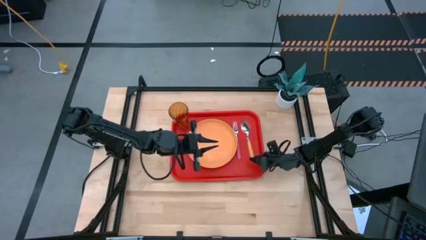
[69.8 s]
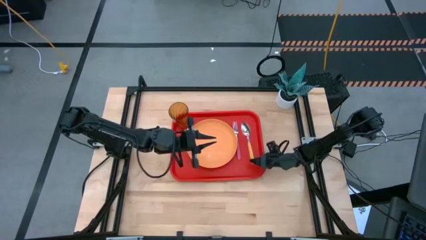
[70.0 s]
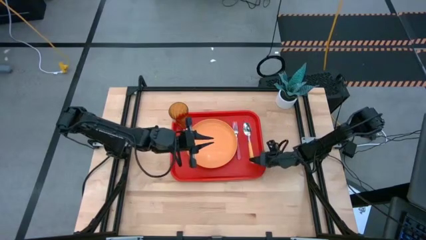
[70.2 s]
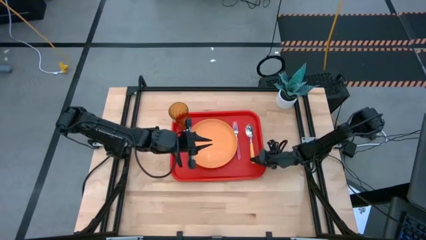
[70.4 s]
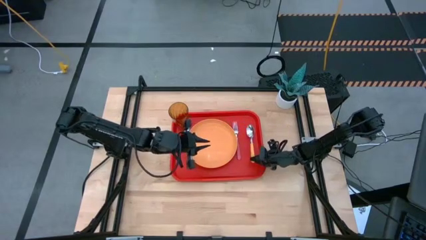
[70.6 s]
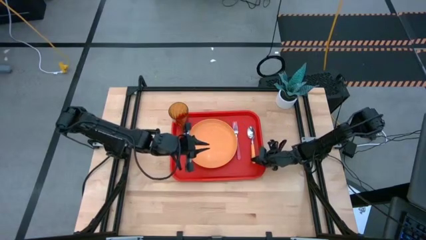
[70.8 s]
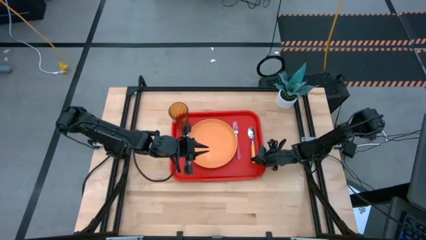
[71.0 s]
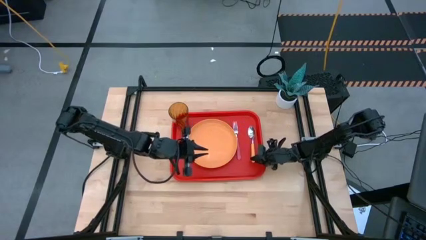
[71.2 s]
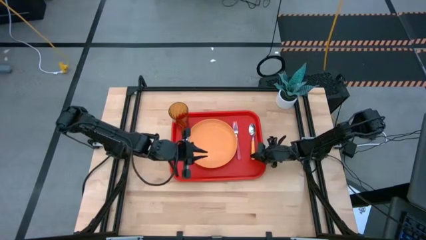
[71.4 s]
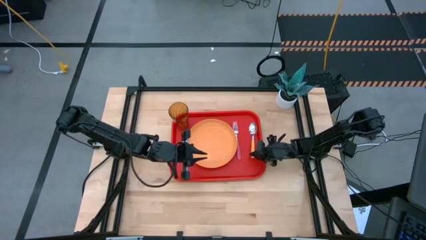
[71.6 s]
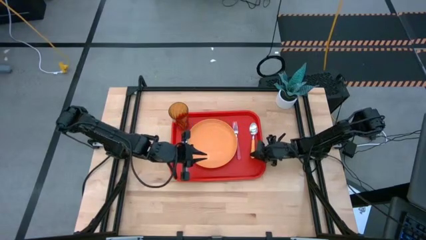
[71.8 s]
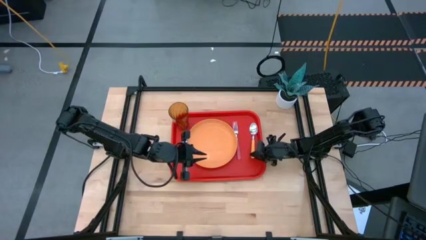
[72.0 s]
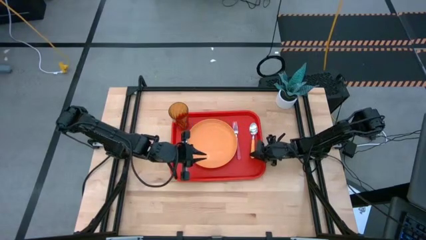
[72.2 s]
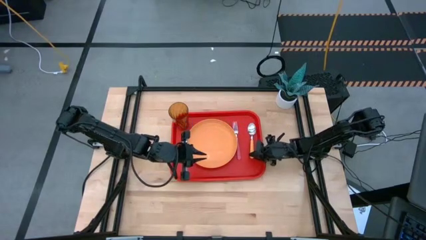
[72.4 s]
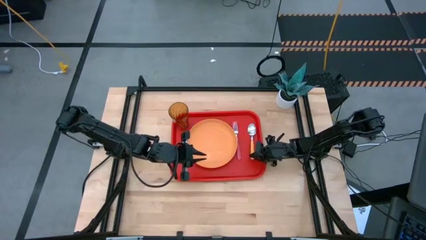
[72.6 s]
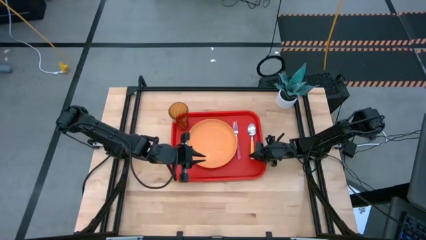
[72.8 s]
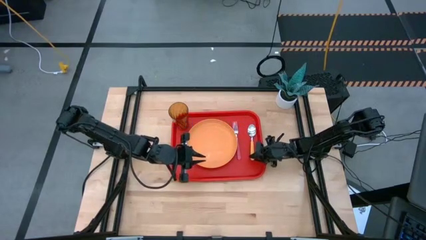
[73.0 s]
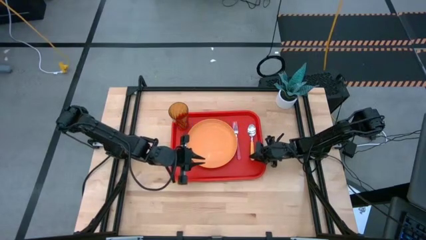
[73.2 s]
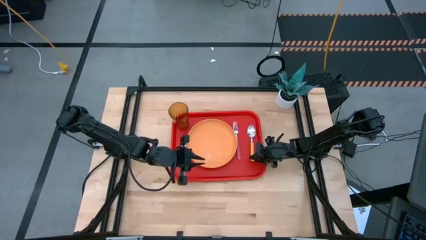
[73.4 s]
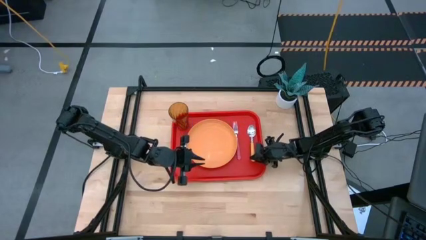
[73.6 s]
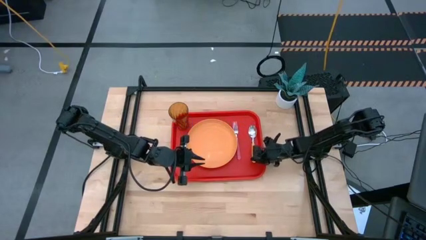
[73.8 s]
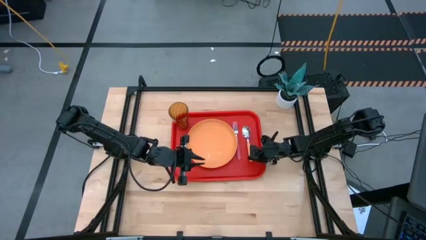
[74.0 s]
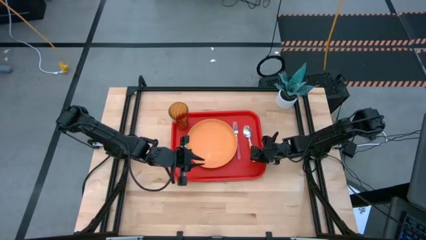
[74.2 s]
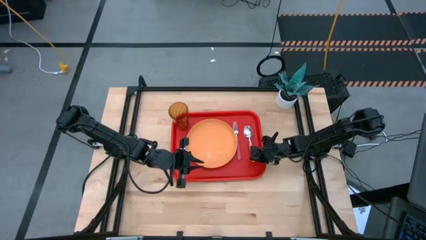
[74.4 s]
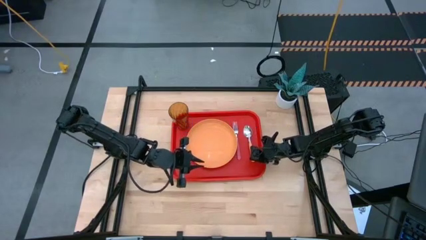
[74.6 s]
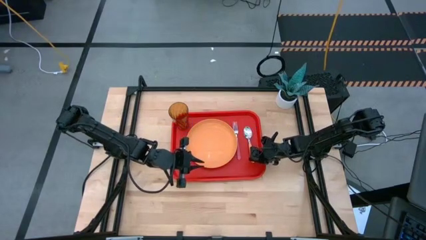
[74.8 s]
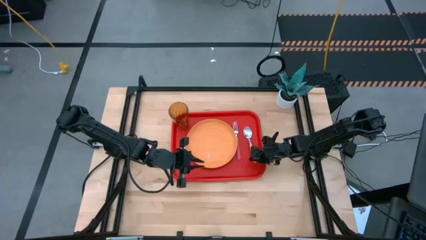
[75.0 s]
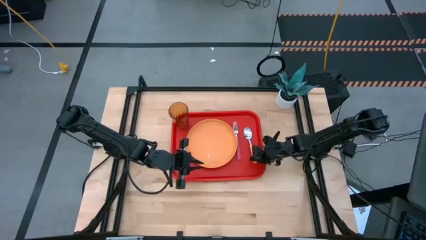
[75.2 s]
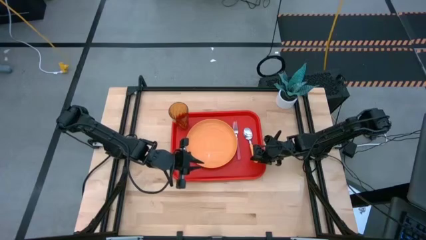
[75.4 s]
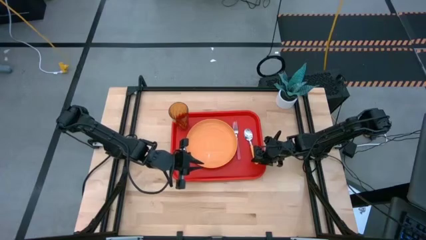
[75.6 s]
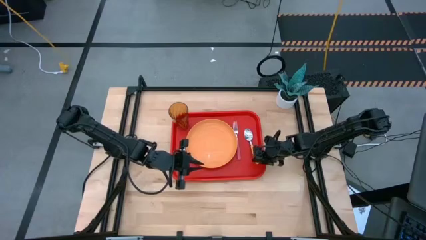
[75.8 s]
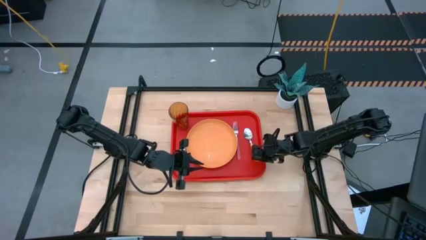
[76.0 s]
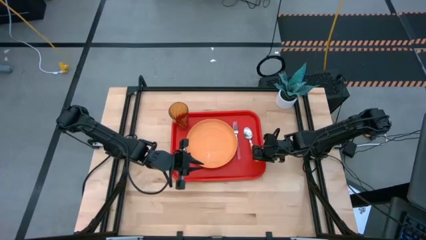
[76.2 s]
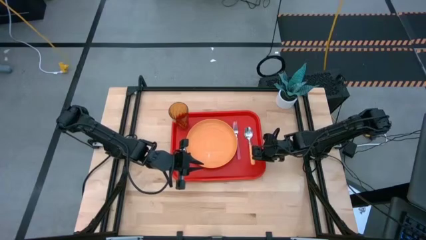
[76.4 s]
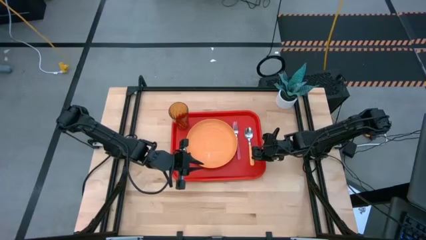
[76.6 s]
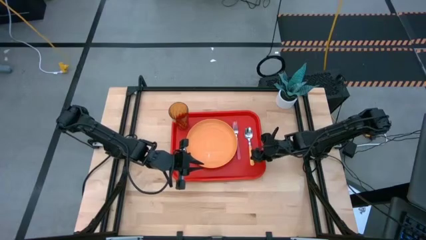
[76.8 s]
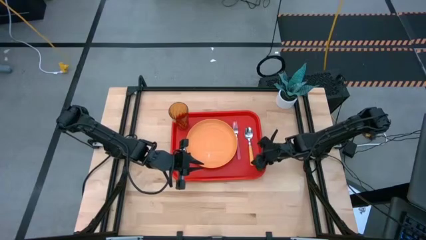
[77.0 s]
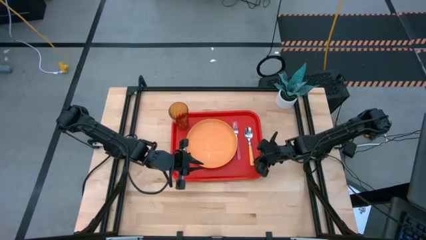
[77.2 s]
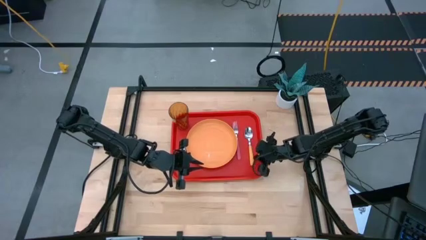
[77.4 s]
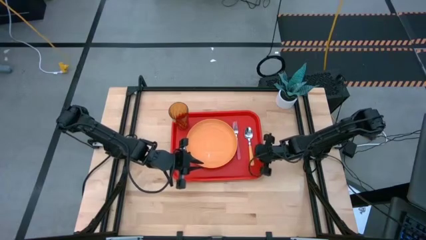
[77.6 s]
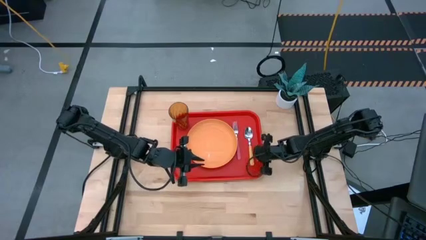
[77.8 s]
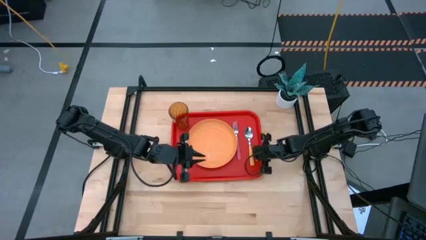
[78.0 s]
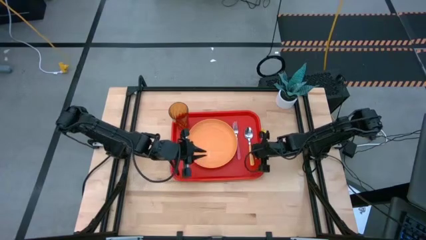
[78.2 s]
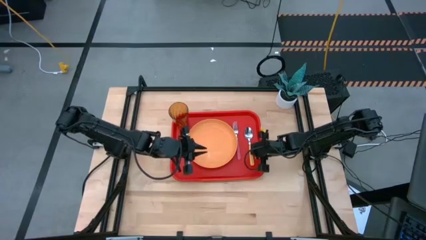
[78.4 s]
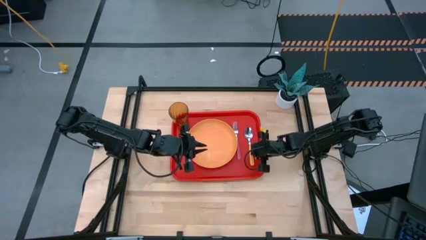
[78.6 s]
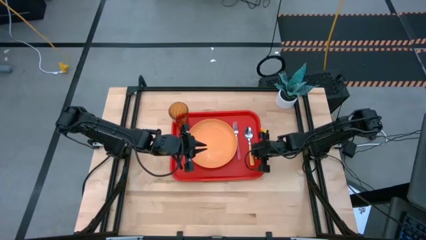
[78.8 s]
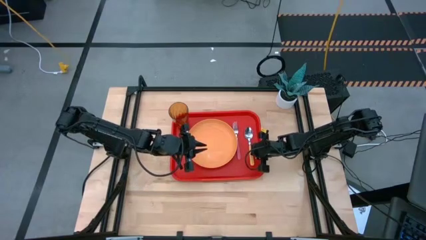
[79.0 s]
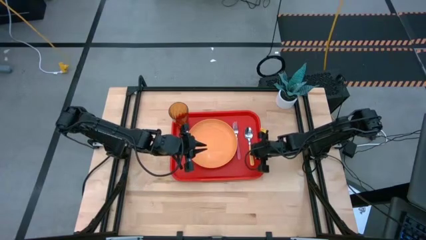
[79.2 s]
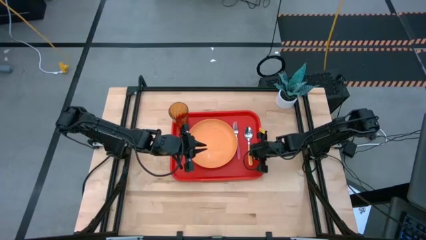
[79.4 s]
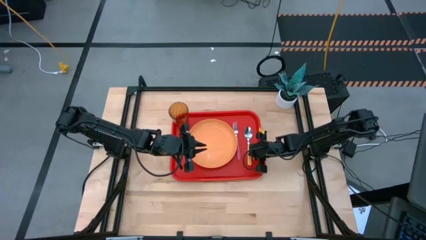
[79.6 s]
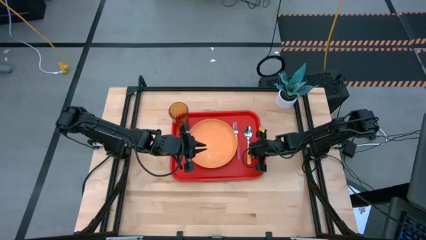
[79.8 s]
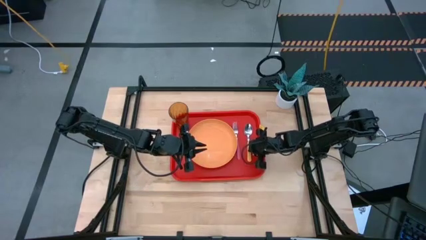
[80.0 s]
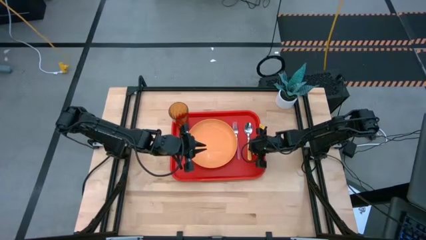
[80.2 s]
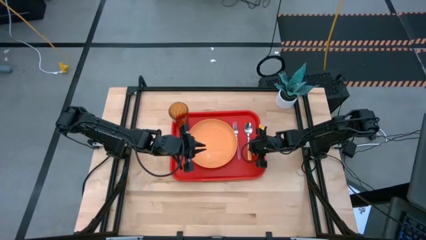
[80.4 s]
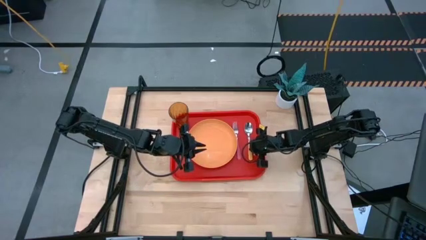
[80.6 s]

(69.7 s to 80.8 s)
Task: Pick and place plate/cup/fork/spoon on tray
Put the yellow spoon on the red tray to the right of the pink fork

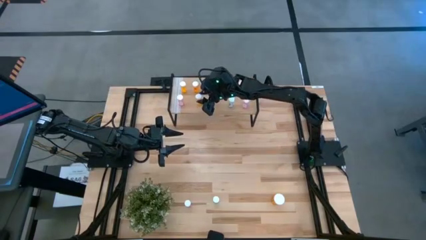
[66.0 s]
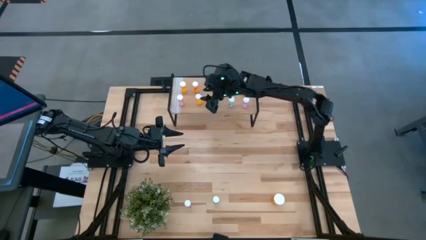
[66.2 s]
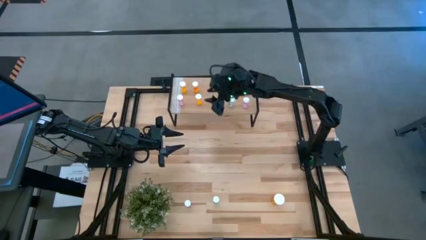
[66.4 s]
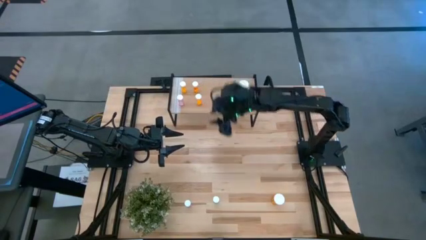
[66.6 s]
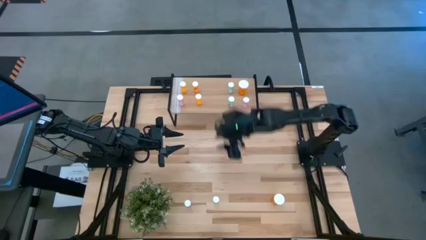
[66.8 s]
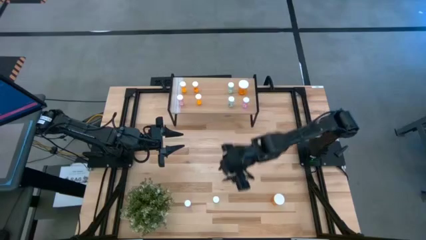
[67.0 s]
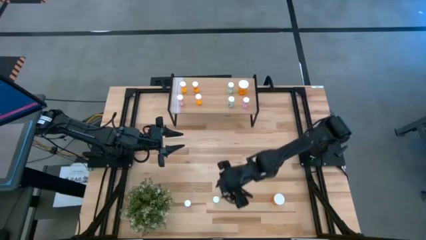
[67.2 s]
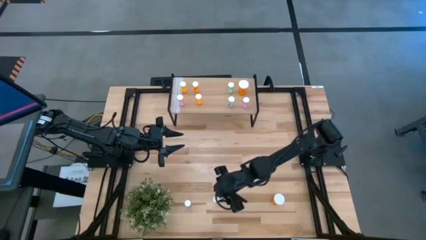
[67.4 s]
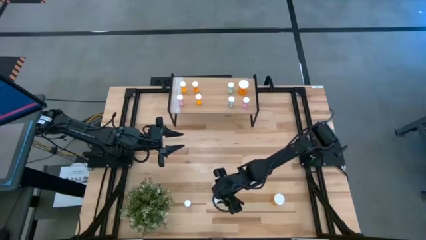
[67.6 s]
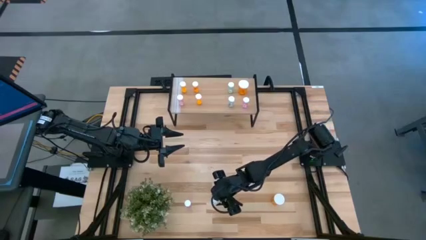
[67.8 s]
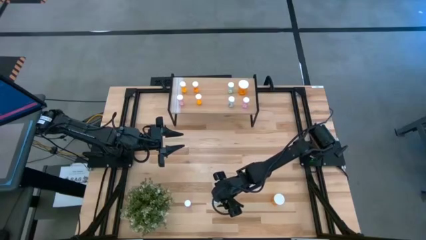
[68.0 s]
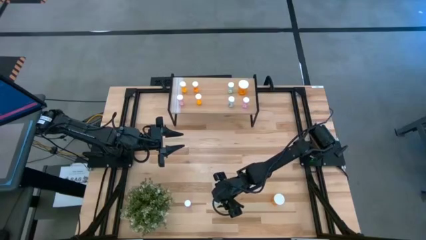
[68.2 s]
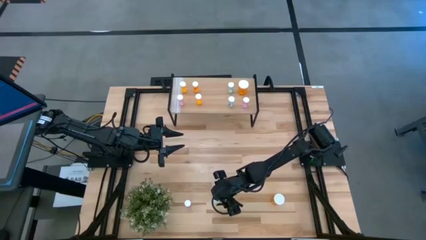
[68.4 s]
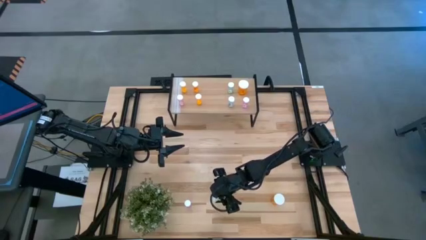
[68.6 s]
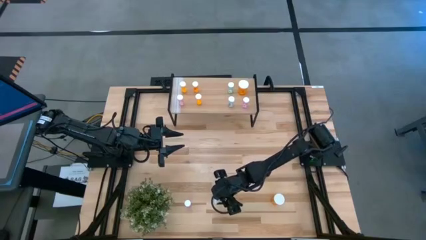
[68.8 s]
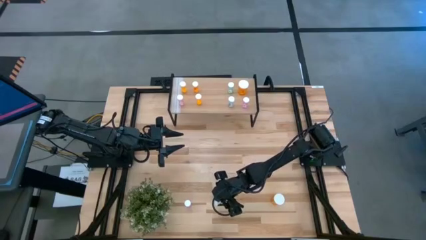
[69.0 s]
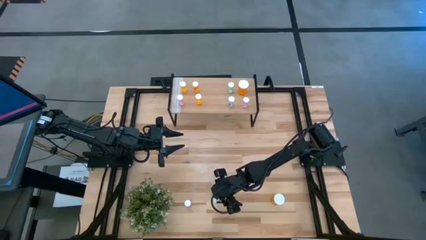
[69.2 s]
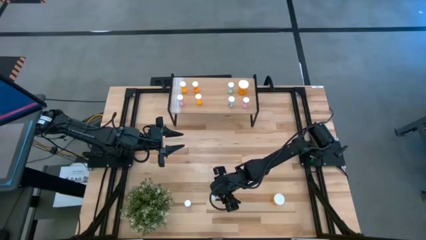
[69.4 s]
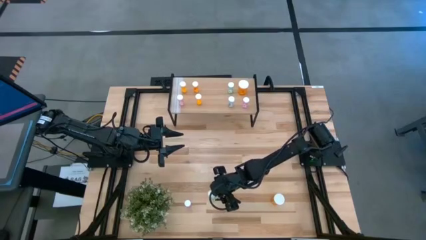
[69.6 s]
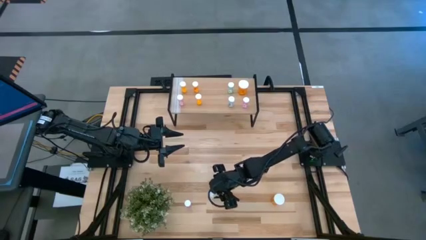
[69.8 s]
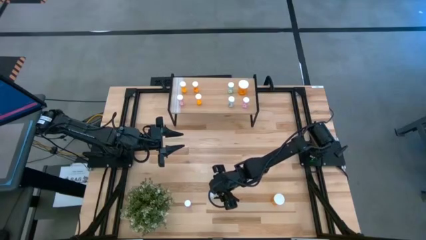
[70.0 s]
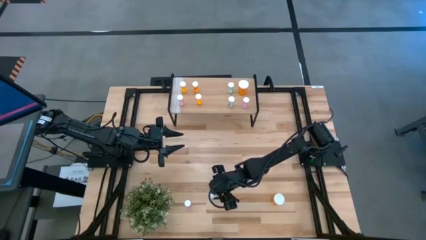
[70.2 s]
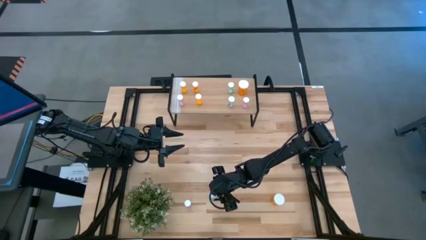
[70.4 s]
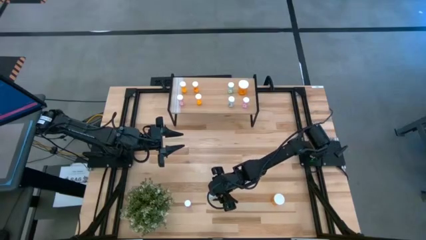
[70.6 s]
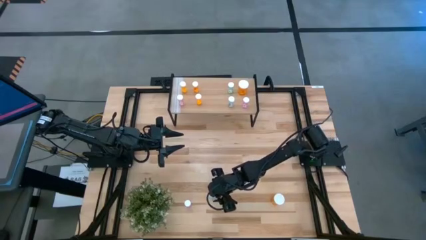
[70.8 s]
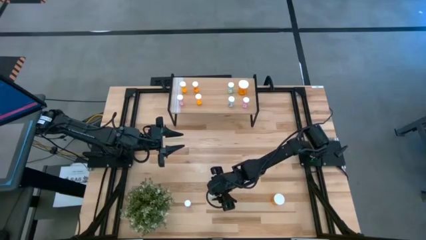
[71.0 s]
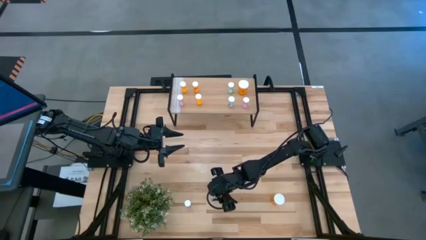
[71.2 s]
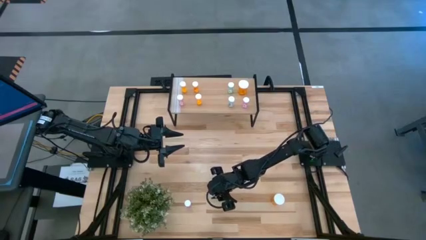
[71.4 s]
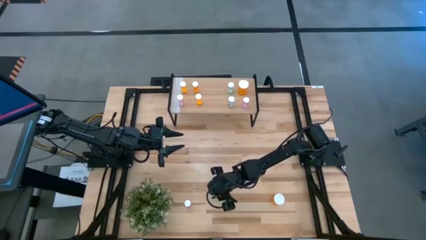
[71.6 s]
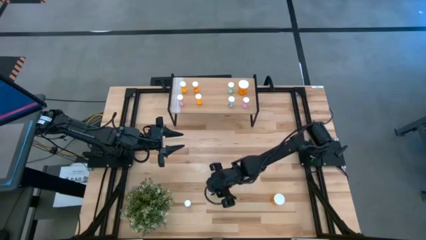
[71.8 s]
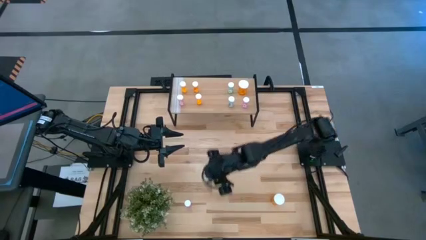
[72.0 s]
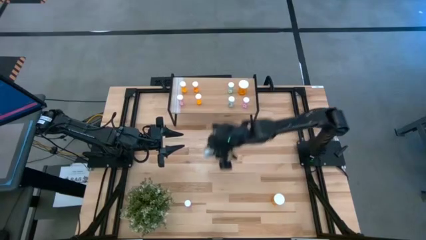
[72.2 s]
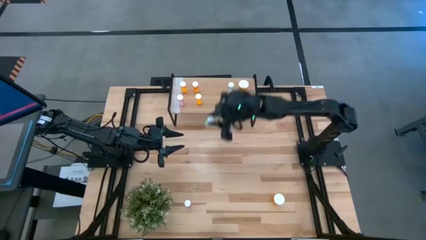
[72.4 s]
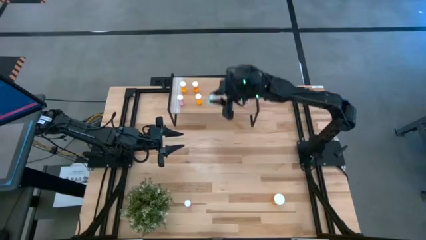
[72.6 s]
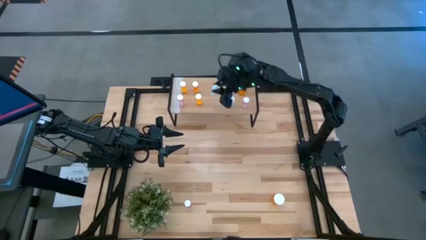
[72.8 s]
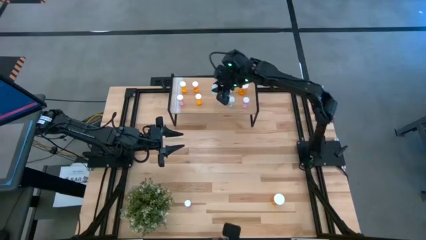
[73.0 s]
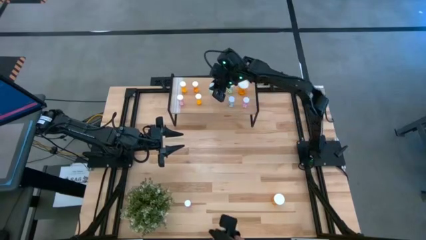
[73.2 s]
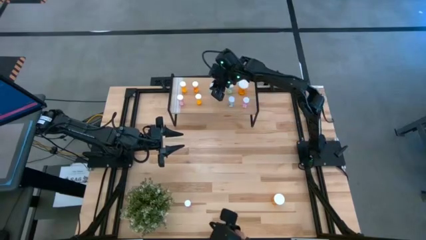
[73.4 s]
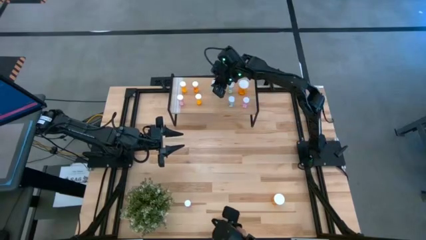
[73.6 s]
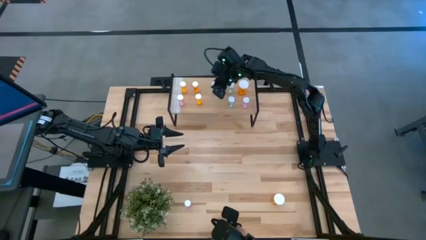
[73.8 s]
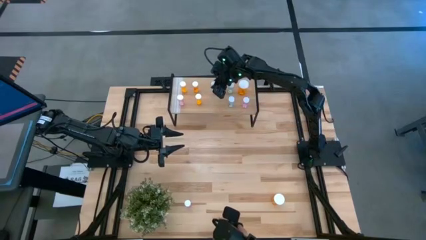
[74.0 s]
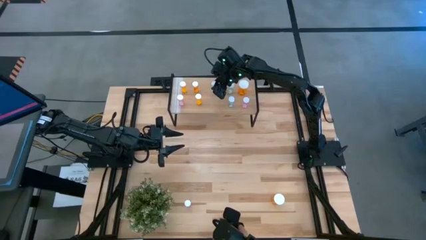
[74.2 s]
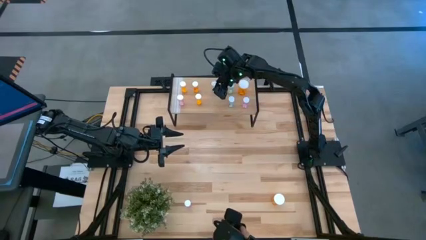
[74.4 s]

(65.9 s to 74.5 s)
Task: Pick and place medicine bottles onto shelf by color
Put the small green pill bottle on the shelf
